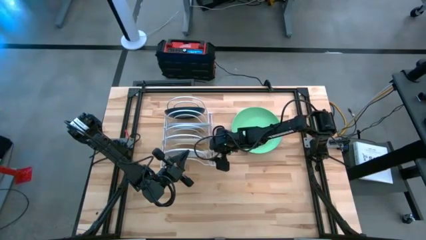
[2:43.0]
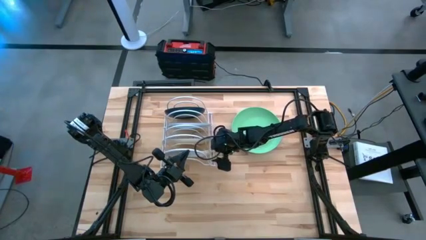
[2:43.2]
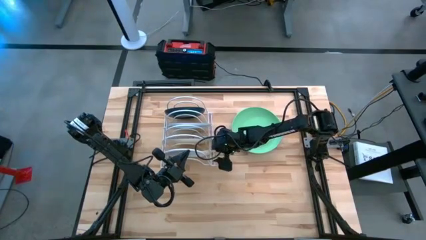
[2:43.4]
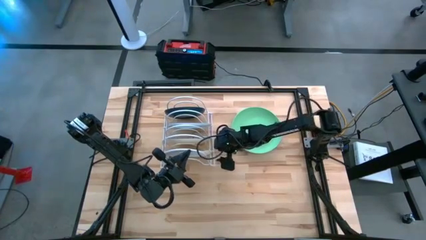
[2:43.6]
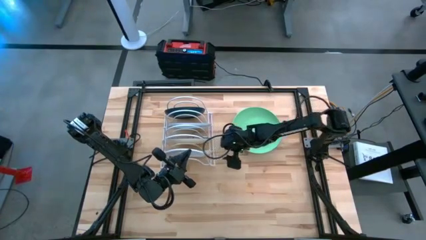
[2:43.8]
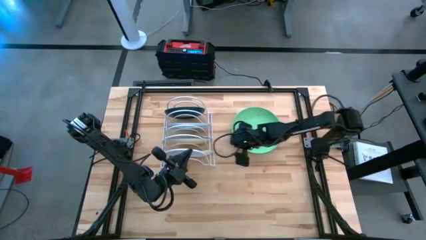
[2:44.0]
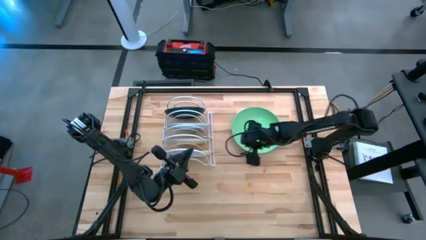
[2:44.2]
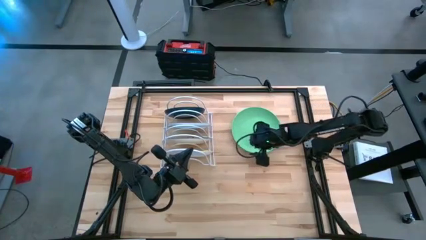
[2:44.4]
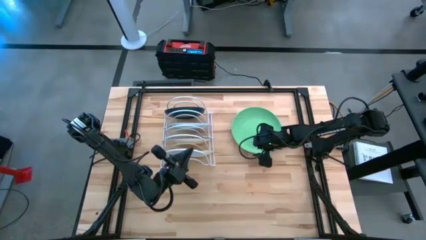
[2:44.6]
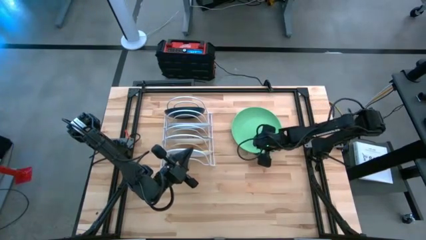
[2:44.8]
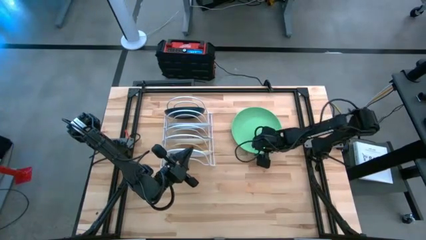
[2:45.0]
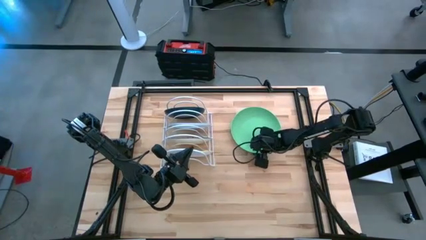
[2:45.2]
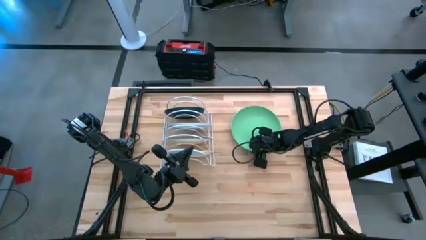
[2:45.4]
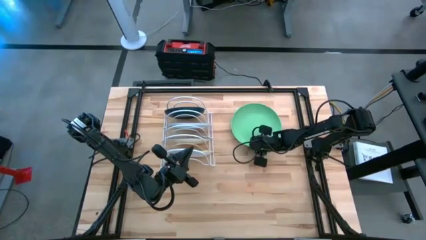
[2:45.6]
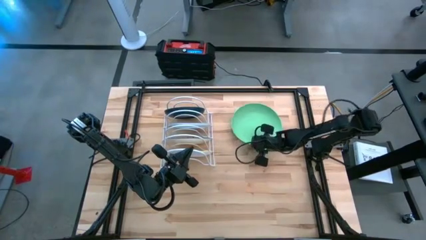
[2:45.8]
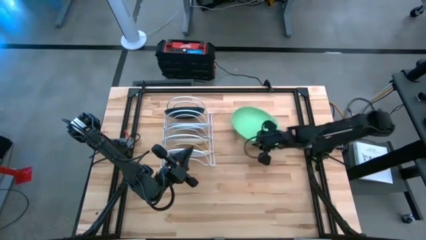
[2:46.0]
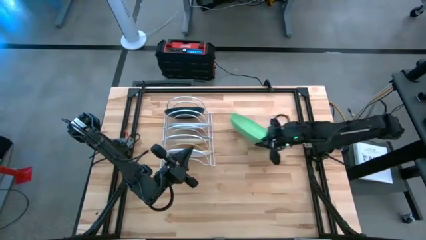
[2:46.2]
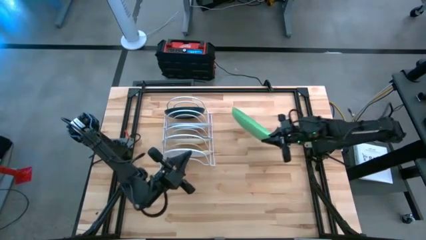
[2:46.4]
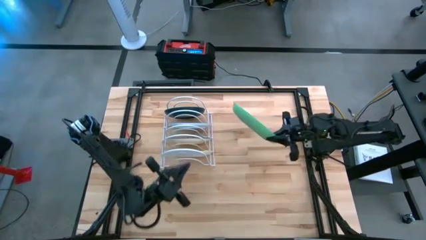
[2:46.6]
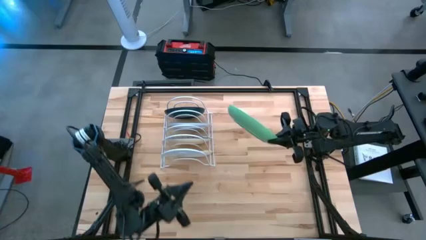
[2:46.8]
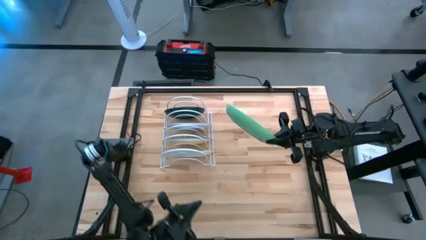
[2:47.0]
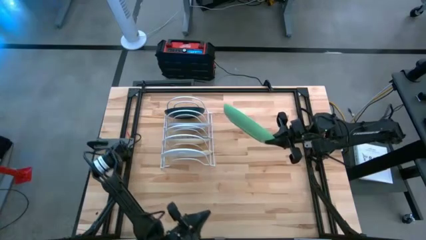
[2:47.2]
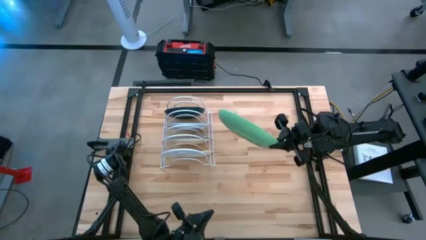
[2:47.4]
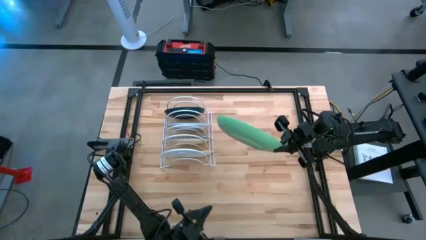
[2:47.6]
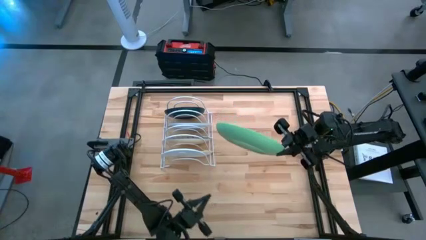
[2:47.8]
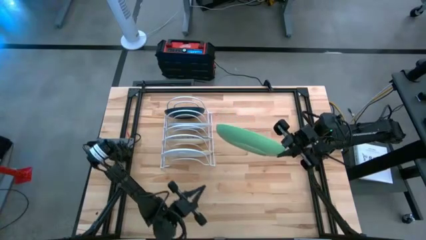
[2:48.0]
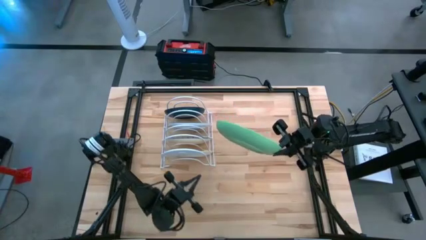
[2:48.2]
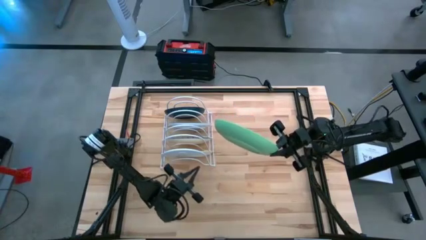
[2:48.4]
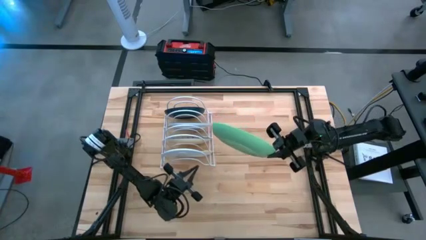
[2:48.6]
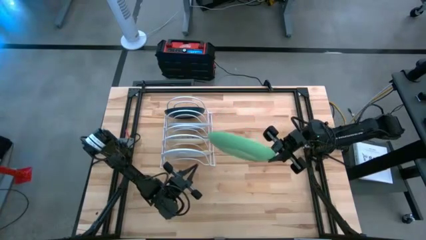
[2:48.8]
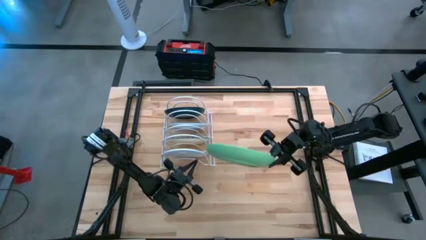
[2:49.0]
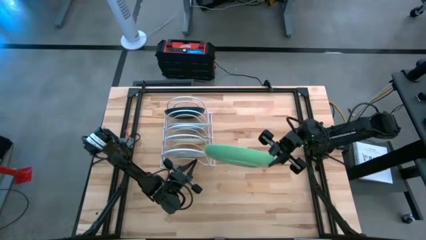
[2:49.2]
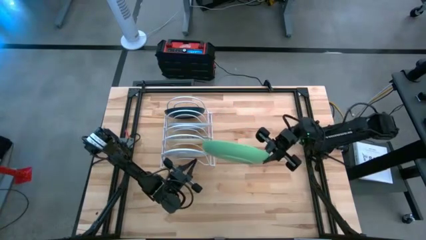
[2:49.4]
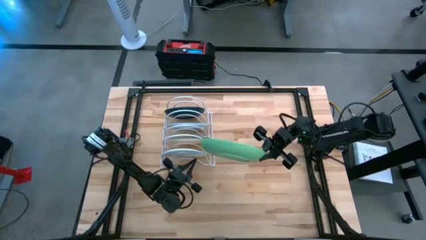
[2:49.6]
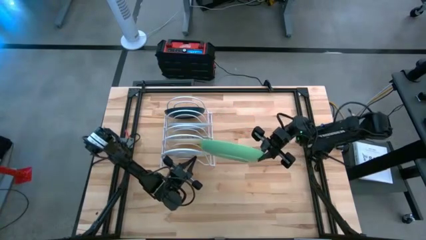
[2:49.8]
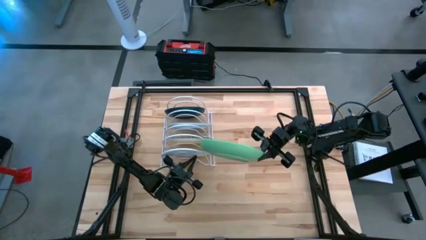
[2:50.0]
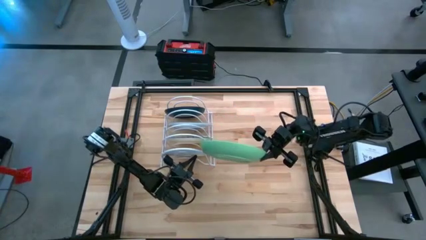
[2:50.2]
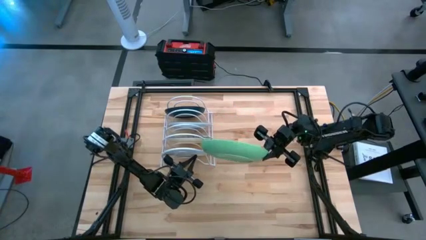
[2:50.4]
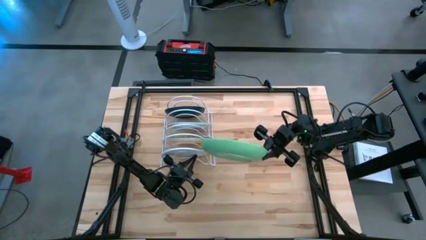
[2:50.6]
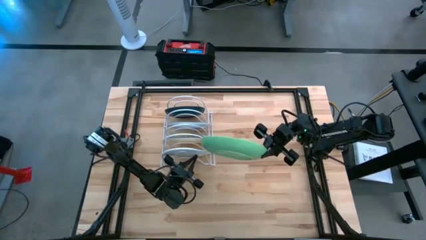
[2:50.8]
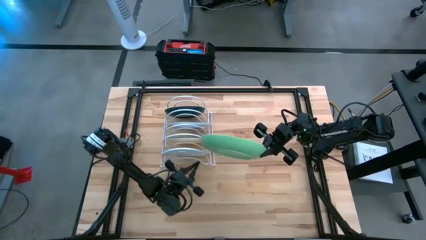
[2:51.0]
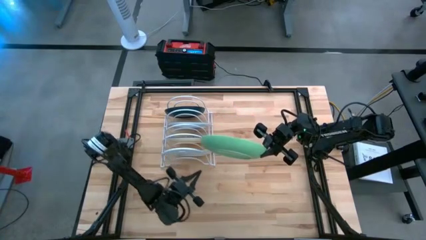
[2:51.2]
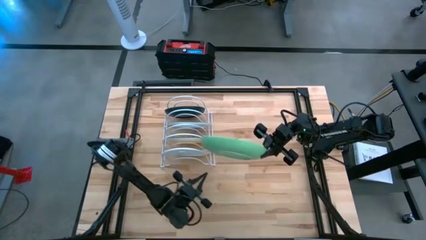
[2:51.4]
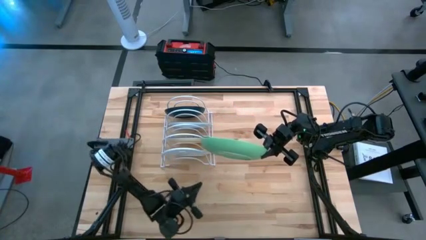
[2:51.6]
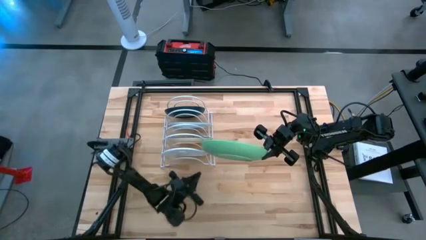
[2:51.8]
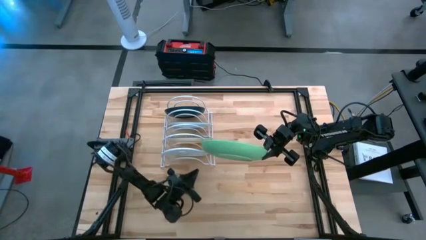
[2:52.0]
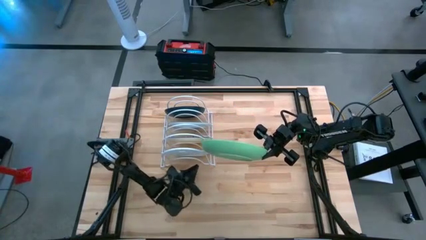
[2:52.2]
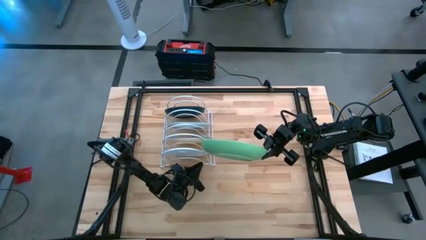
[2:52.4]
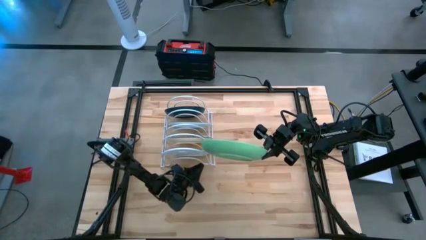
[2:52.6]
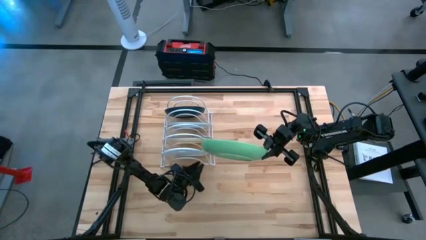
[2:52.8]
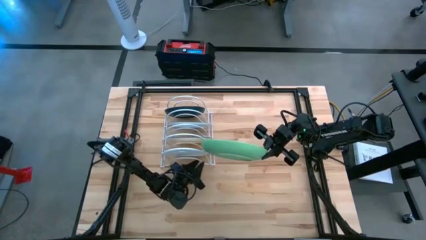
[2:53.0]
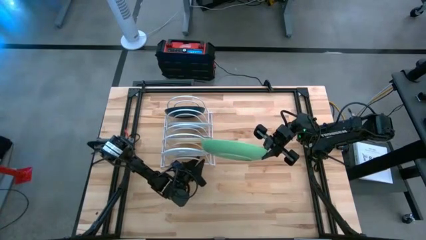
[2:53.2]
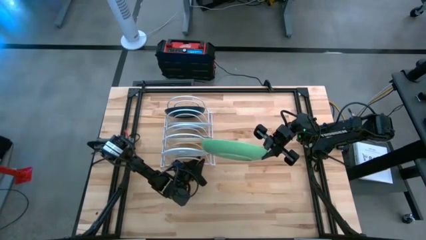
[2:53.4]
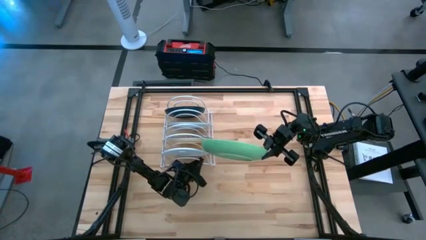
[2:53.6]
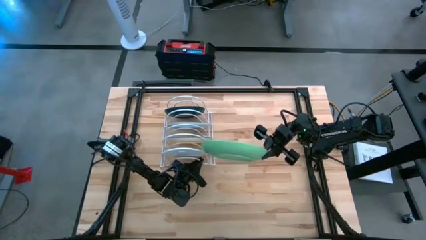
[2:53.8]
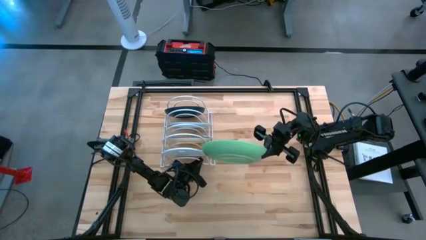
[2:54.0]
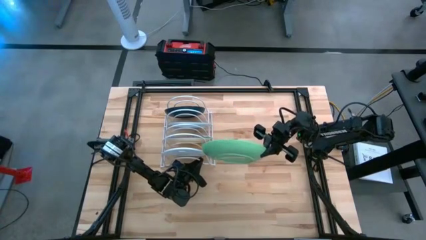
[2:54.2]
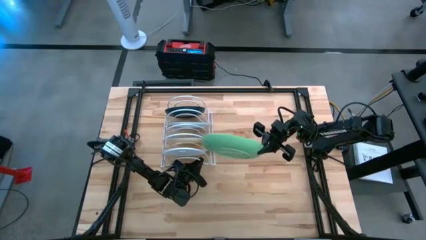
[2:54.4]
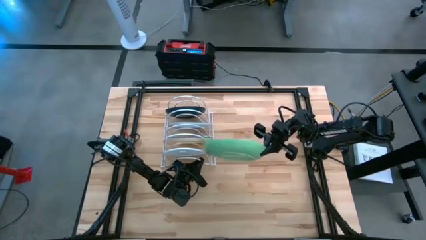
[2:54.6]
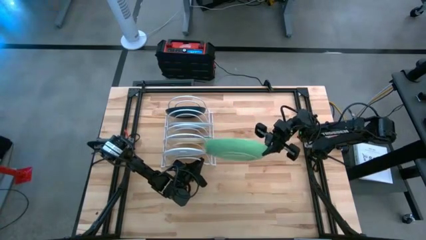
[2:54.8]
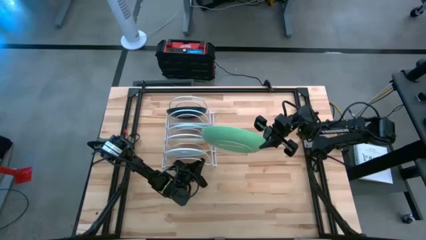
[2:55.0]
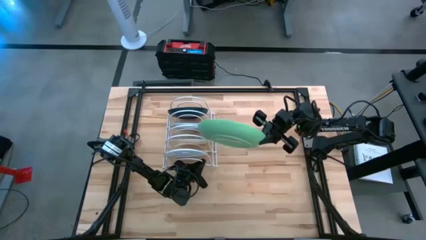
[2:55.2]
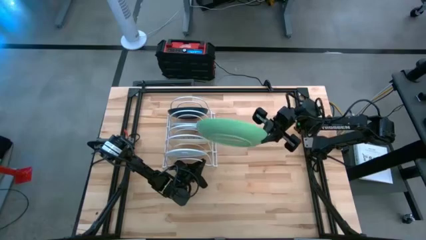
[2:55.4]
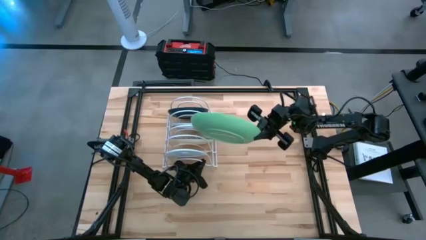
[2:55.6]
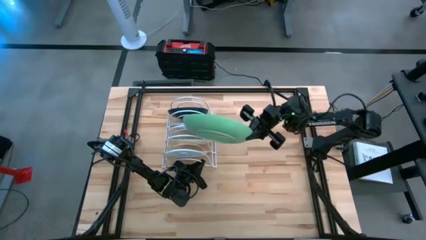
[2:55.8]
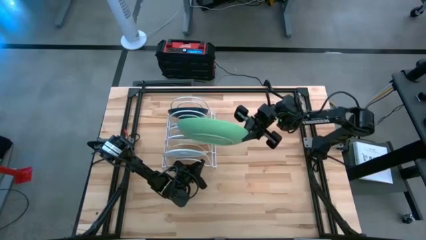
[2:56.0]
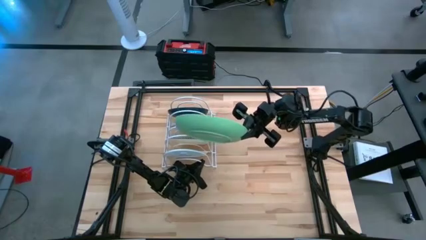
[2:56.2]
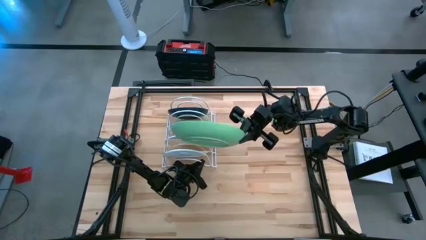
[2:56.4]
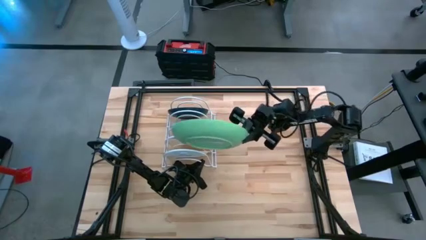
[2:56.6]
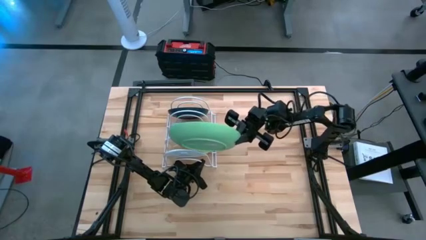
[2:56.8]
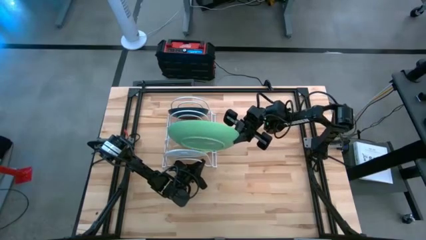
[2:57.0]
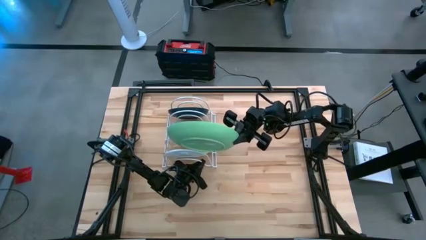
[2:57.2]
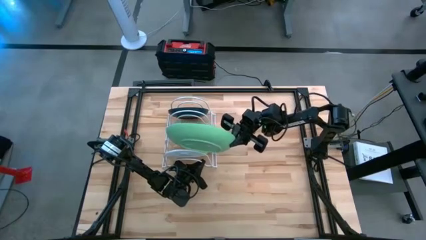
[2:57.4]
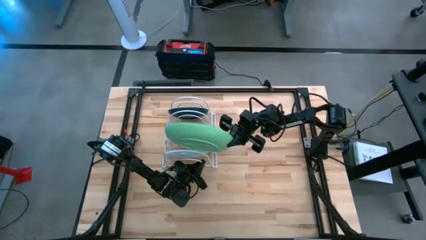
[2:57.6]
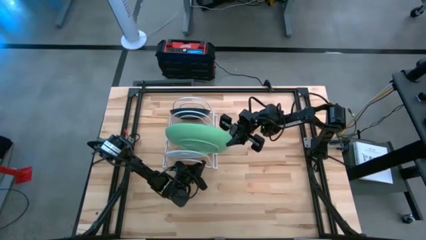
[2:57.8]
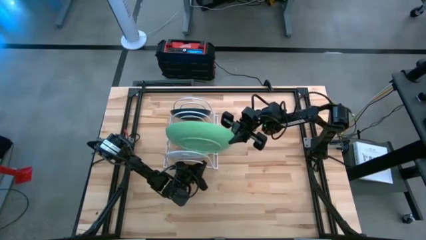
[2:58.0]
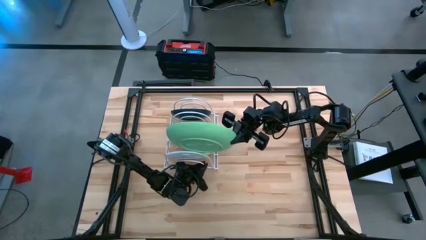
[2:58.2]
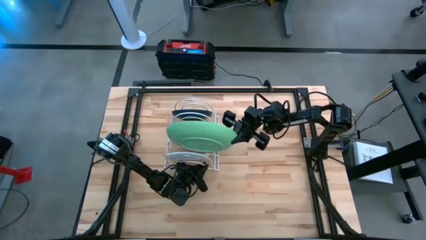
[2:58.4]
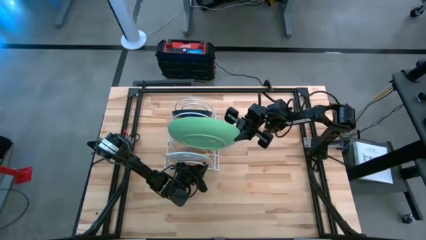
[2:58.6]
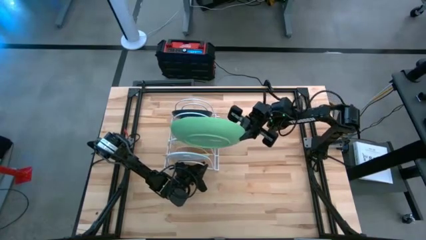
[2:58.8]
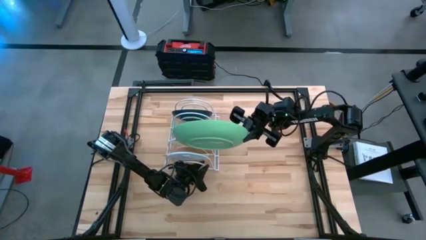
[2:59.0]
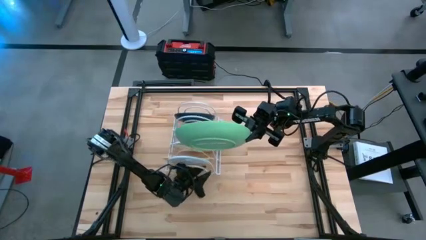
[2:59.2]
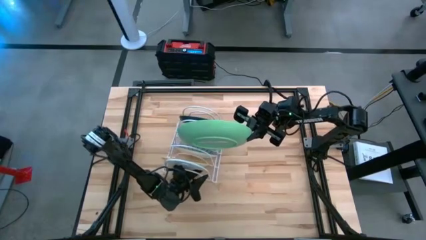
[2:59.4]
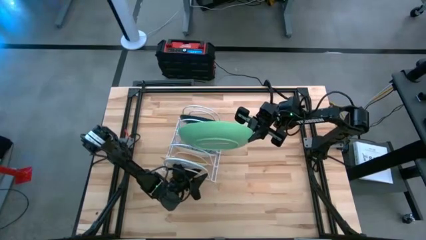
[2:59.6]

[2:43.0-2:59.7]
Task: Sort dishes
Put the green plate in the dish rack
